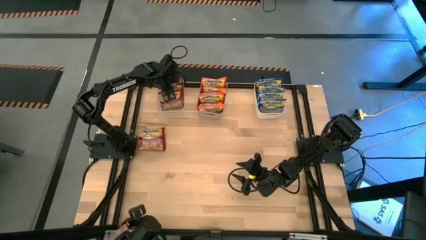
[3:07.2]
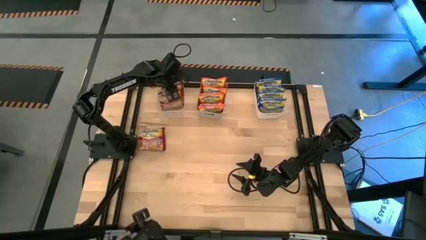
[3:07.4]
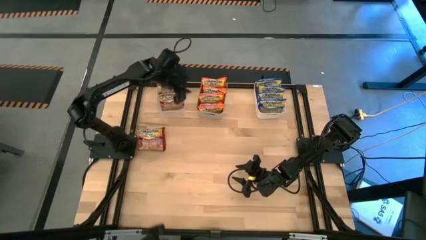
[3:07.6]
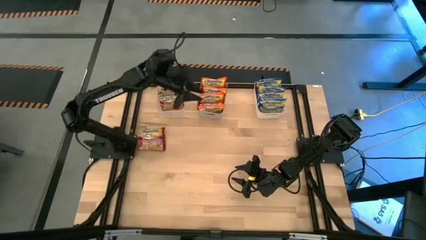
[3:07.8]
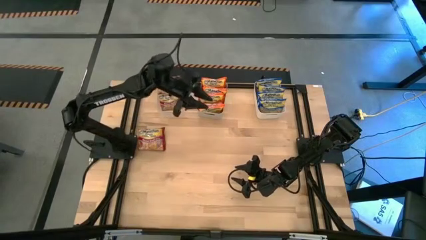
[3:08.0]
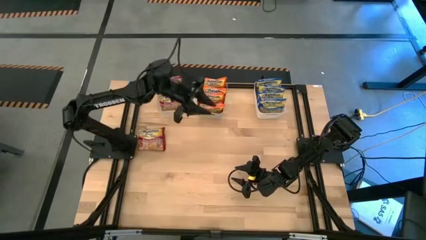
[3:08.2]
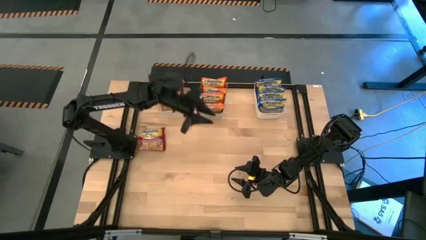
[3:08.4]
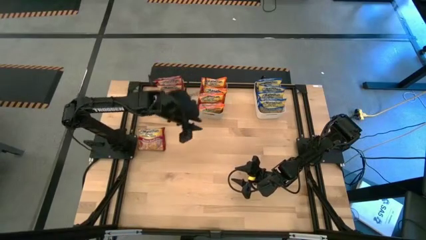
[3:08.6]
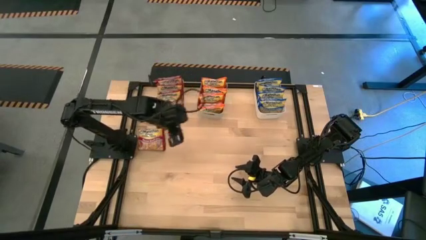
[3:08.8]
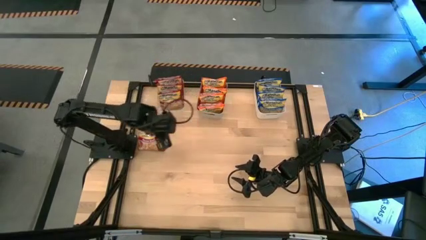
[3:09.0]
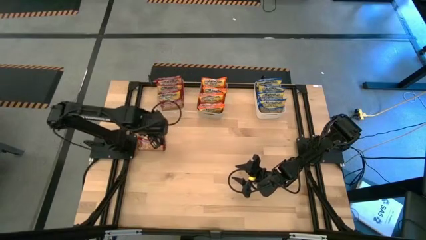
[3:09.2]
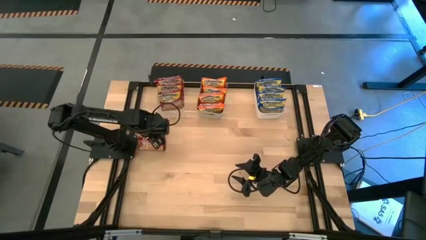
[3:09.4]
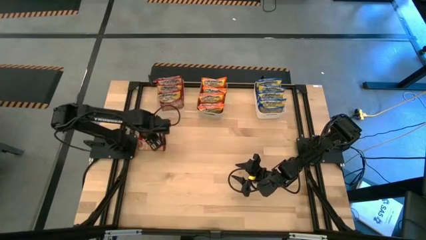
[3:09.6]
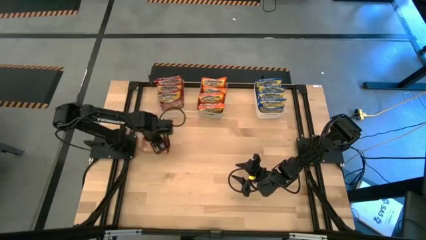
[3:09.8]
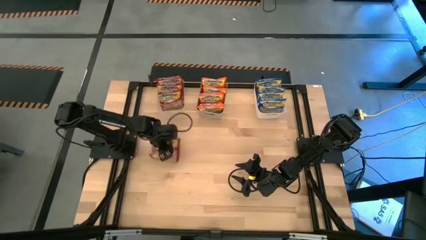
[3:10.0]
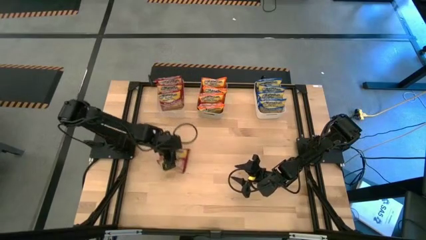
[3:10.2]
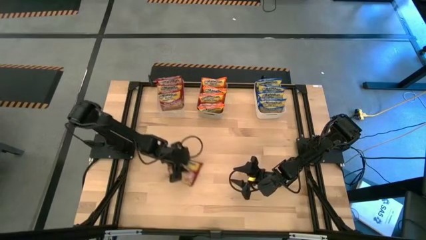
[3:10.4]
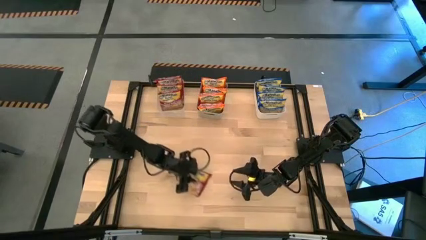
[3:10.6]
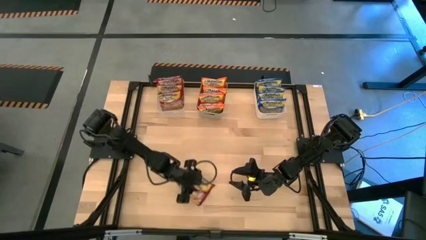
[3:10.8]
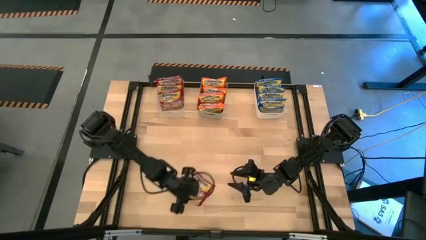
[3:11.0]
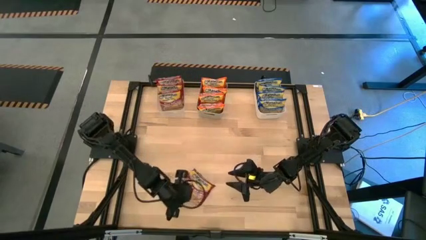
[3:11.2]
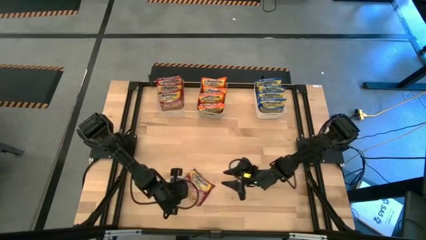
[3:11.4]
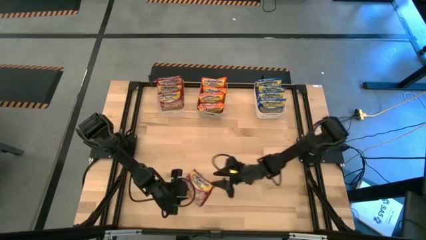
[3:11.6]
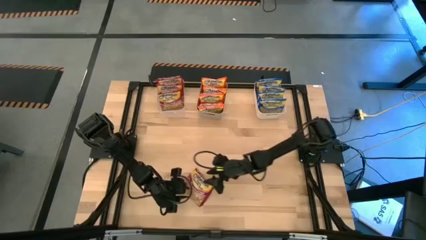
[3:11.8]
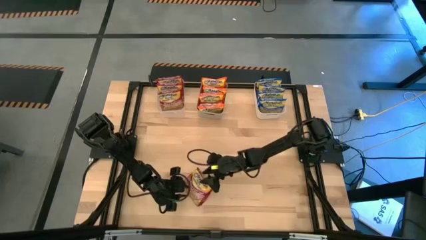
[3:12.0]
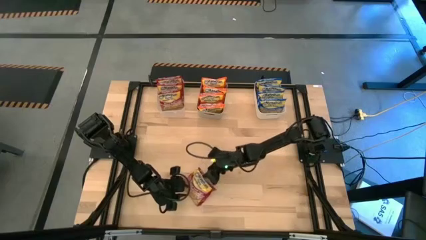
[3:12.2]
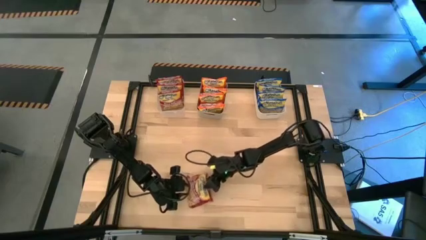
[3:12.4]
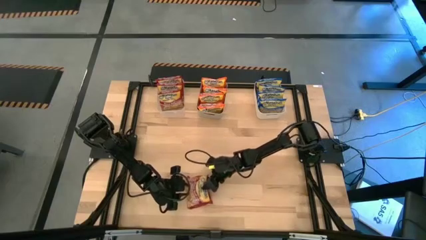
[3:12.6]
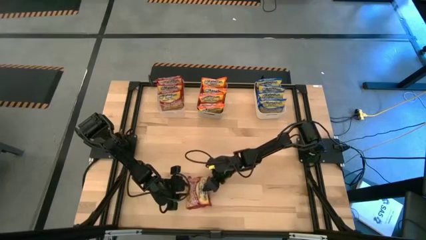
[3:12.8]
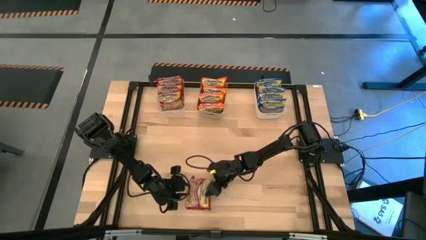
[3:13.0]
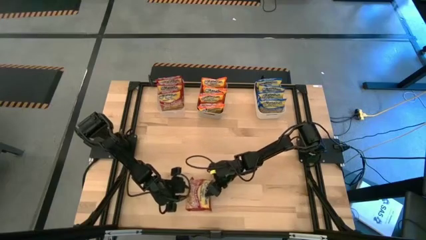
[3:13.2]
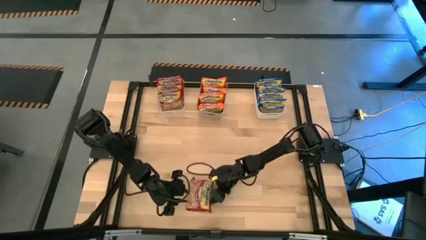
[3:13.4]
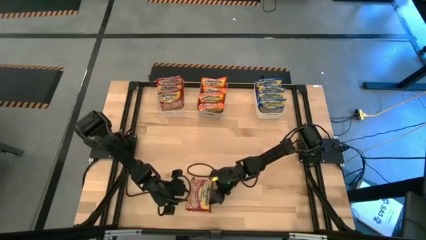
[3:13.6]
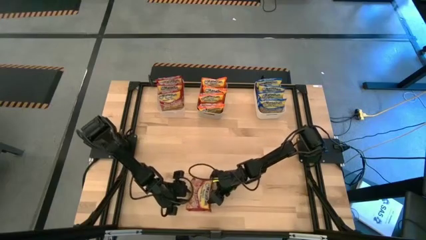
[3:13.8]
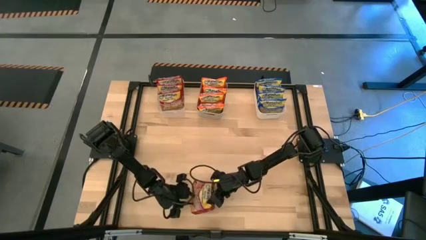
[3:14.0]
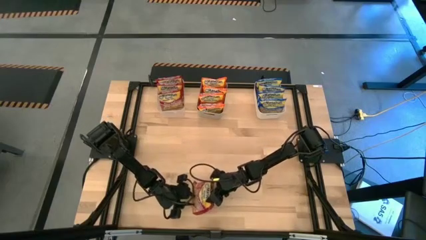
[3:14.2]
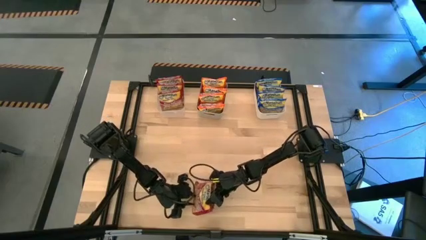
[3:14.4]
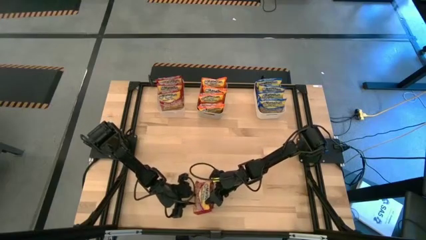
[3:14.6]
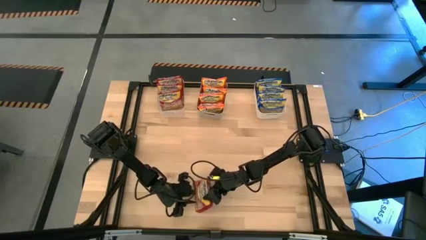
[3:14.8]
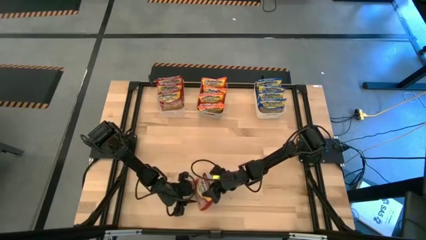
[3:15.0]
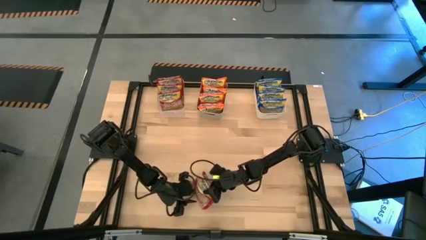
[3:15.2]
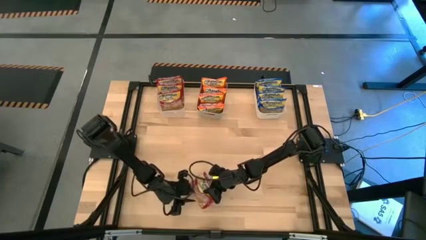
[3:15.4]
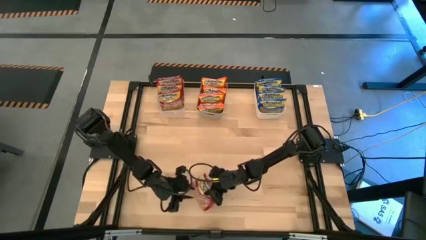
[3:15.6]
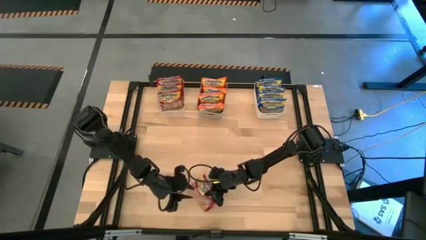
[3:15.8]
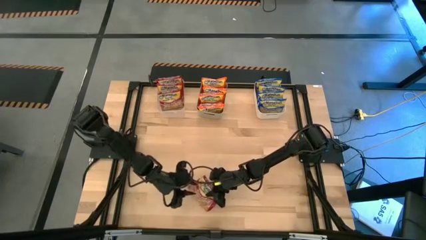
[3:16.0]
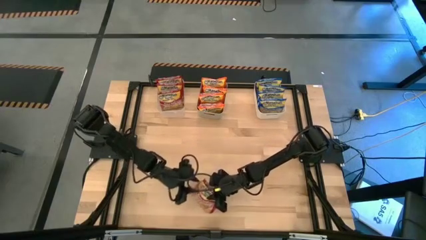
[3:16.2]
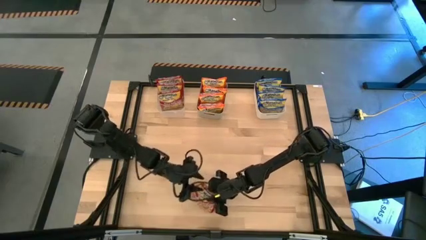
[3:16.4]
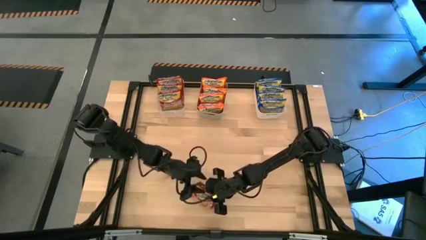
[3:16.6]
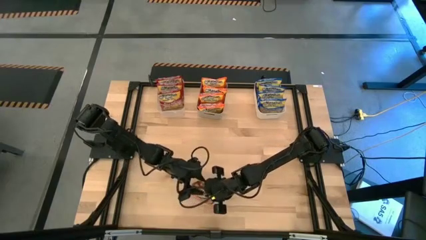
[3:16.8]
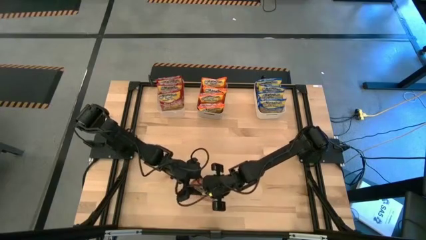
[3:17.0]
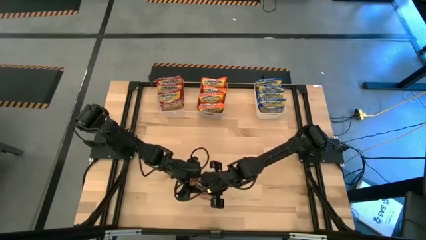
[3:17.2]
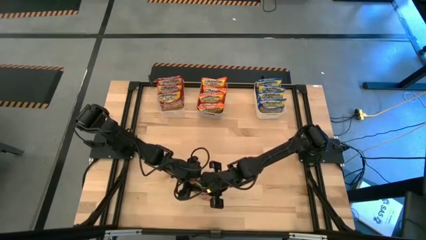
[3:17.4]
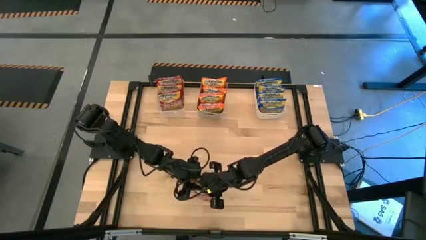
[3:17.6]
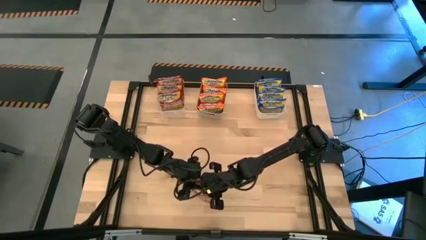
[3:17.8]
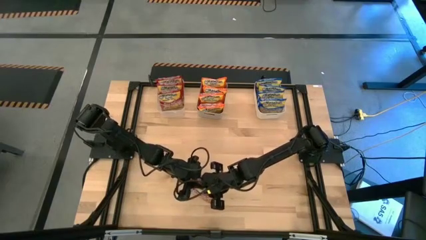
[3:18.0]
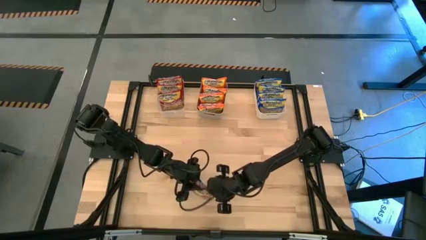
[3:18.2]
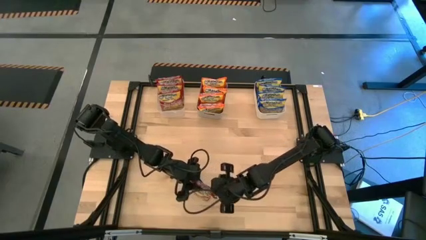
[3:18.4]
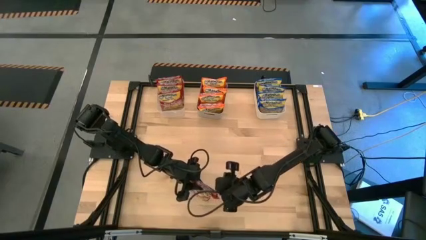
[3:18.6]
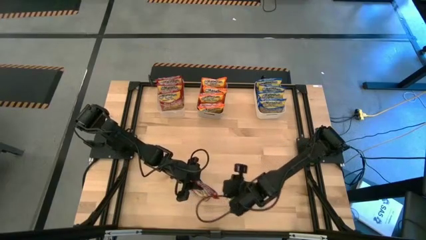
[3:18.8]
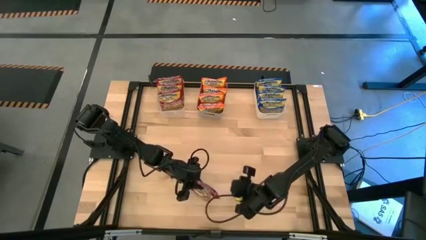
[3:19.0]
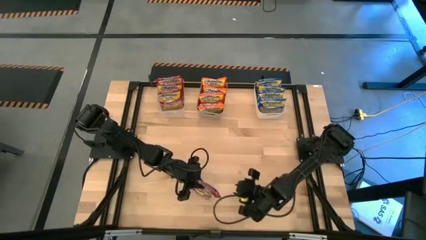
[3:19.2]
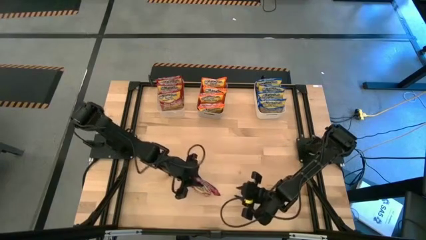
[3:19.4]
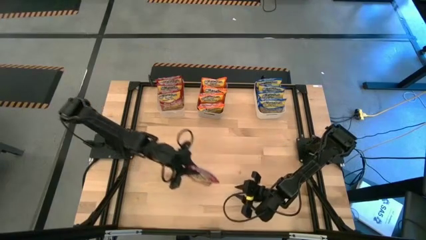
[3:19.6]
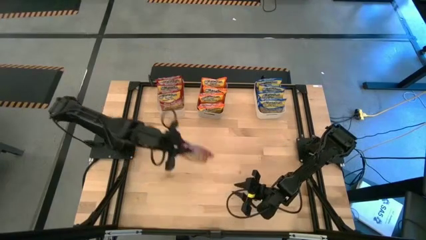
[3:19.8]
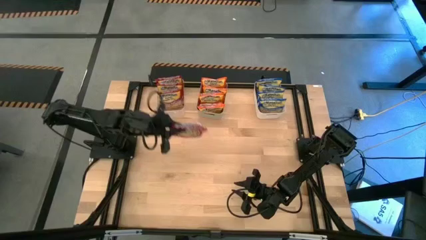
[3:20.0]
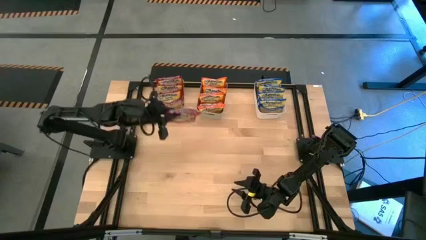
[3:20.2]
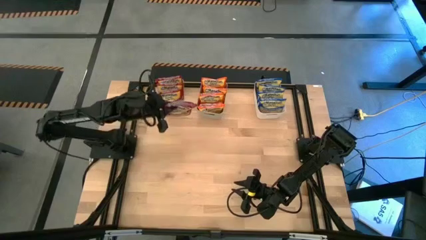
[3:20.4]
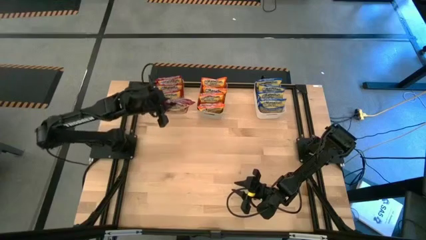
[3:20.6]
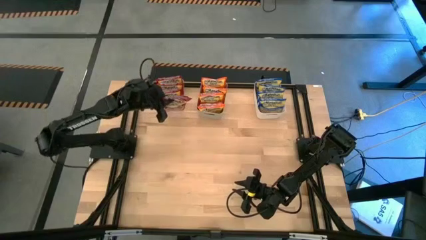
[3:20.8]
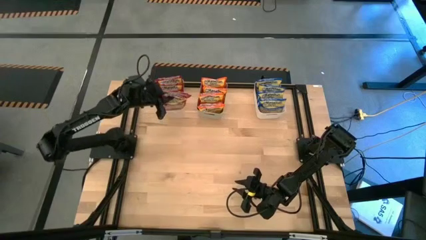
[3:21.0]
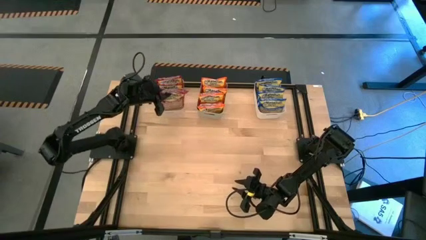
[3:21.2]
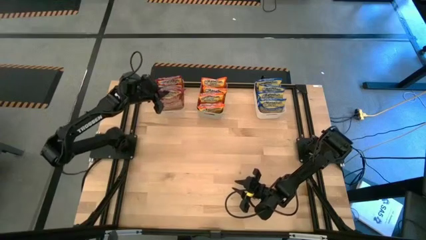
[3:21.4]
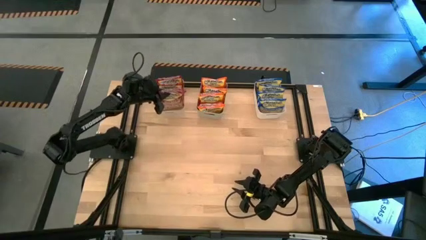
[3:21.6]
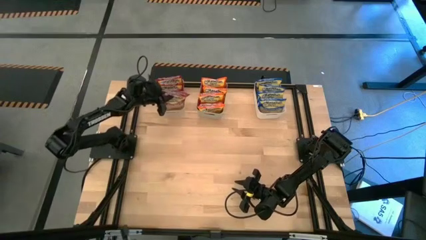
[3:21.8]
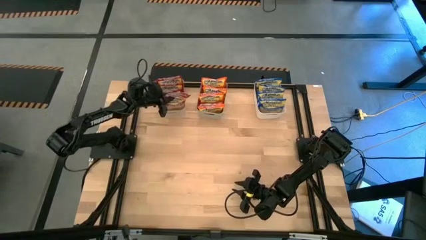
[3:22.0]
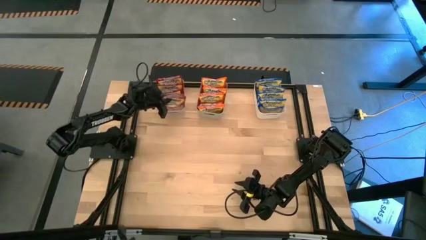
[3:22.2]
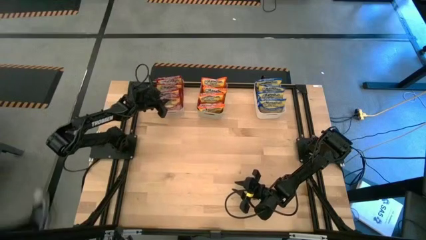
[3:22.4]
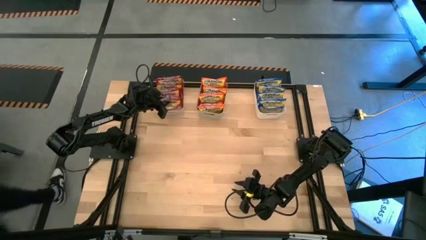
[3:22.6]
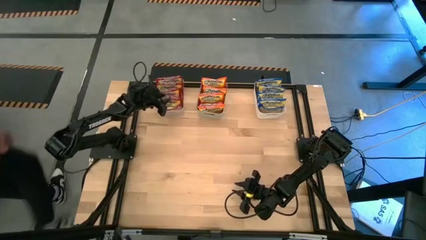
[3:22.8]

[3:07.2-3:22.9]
Task: Sort Maruchan noodles
Put the red noodle pack into the transparent bin

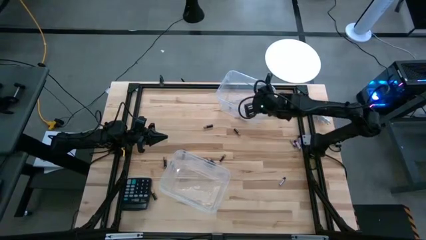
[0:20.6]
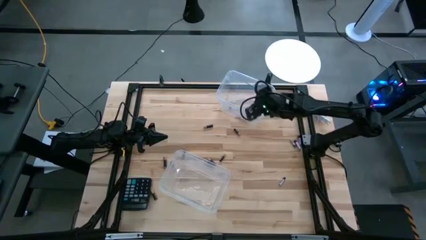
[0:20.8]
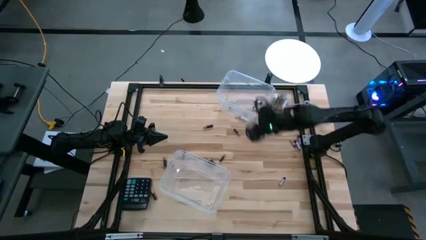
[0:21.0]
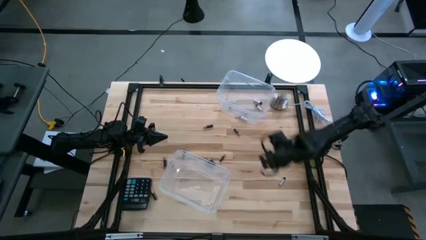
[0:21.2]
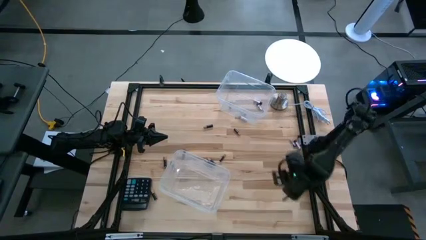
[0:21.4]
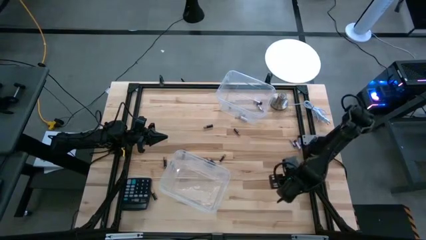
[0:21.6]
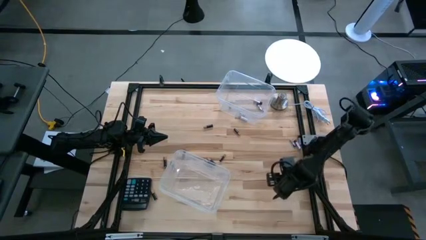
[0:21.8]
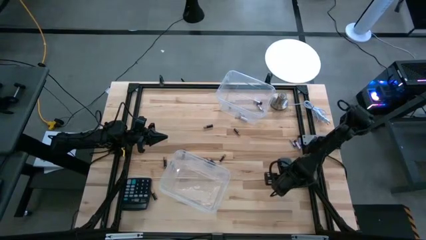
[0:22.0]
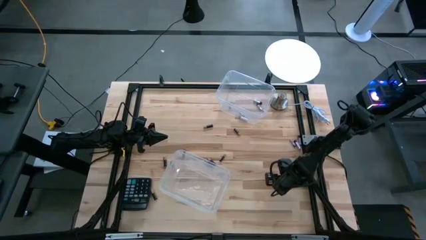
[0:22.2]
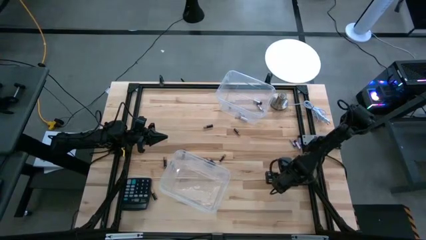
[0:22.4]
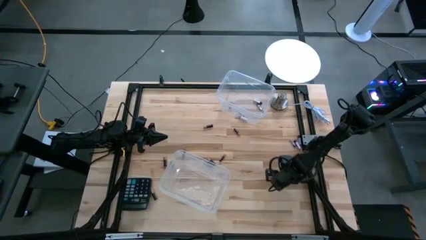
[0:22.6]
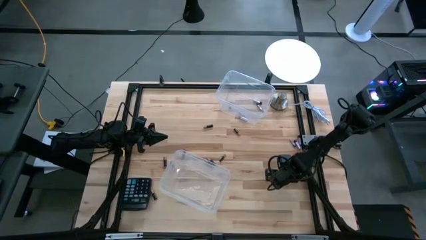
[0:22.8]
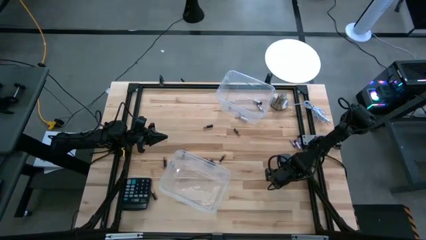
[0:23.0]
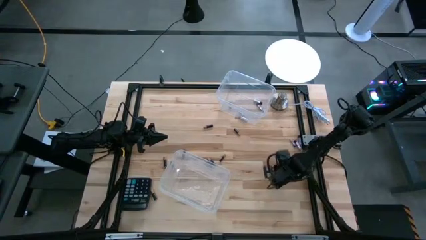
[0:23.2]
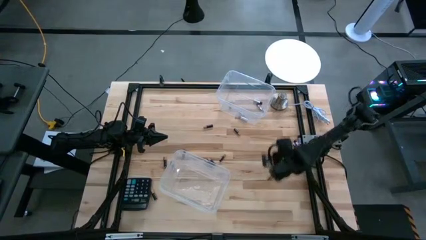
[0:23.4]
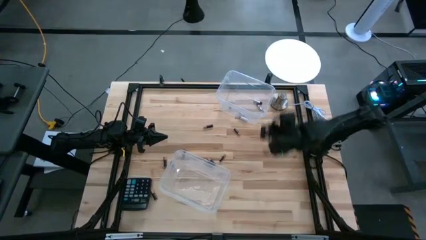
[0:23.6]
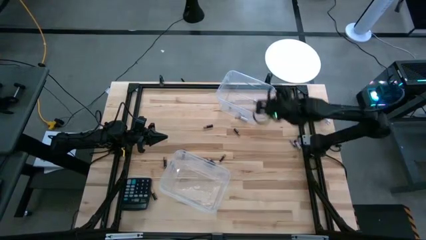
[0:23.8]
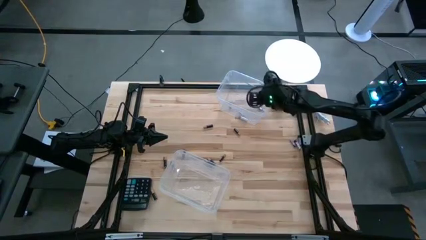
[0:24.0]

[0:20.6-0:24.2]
Task: Sort batteries
Put the silver battery into the top transparent bin
